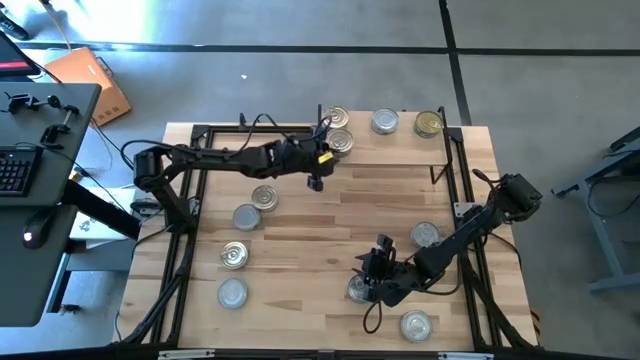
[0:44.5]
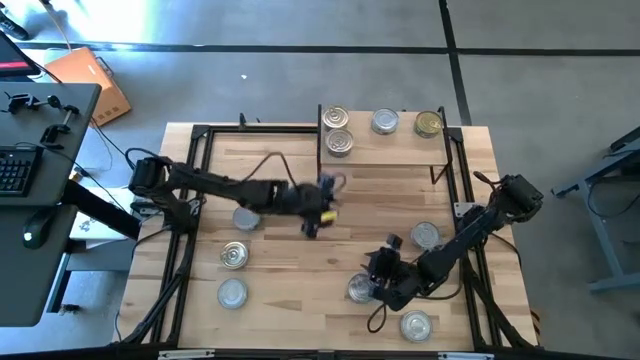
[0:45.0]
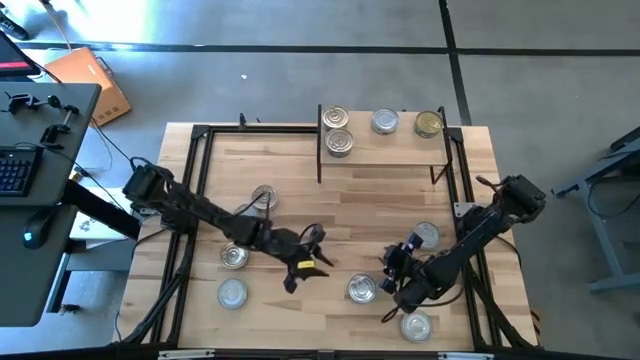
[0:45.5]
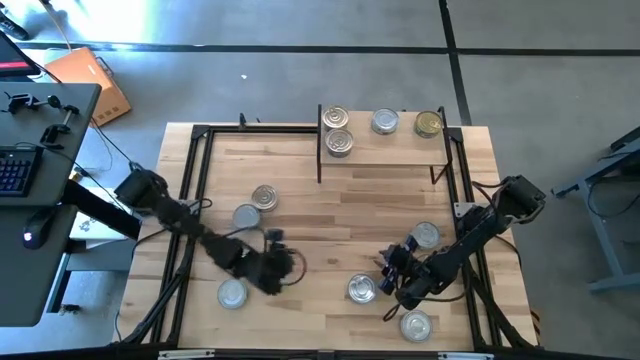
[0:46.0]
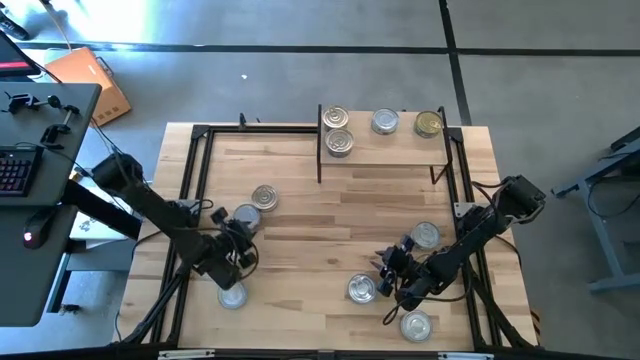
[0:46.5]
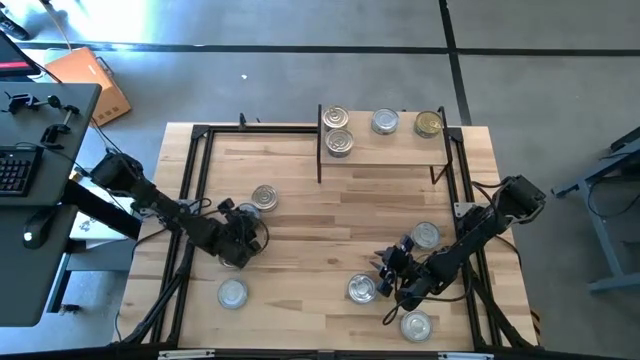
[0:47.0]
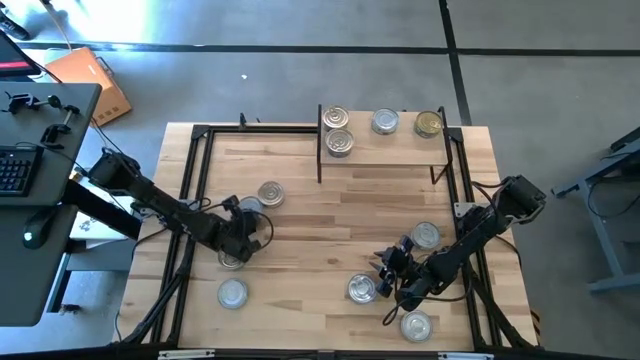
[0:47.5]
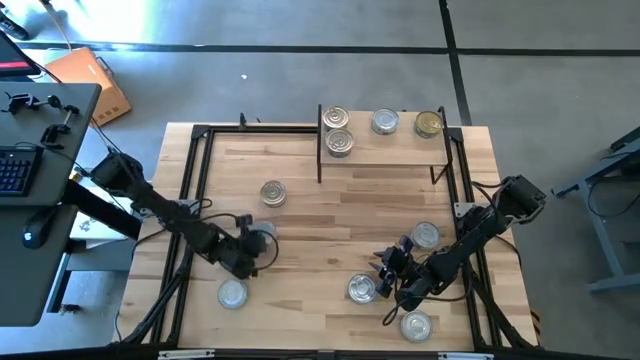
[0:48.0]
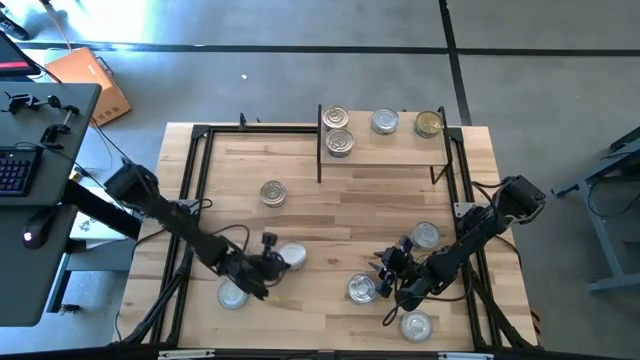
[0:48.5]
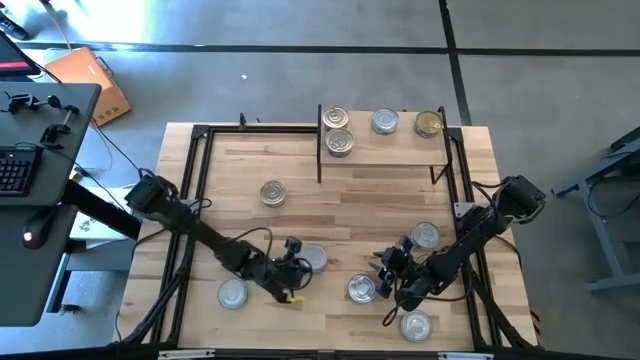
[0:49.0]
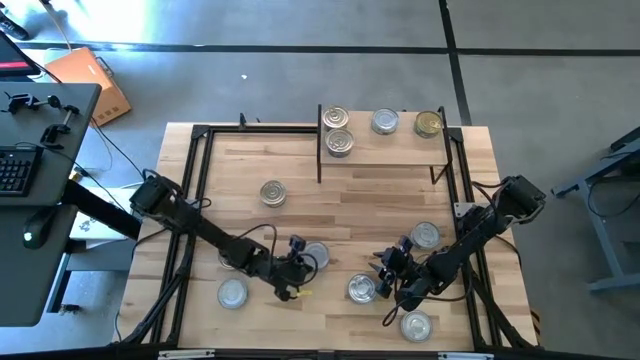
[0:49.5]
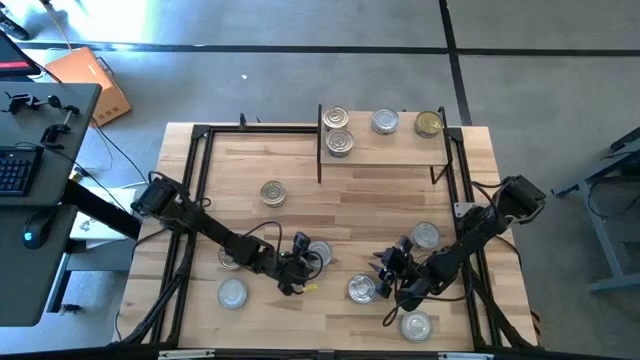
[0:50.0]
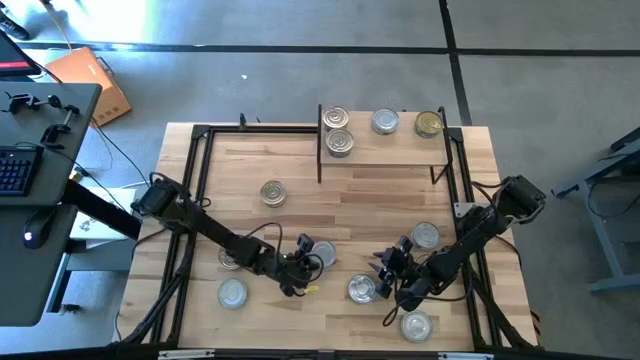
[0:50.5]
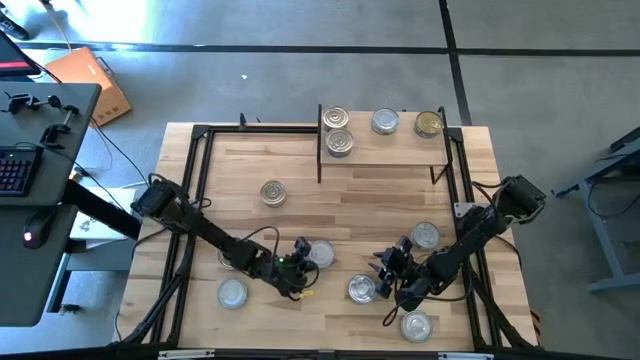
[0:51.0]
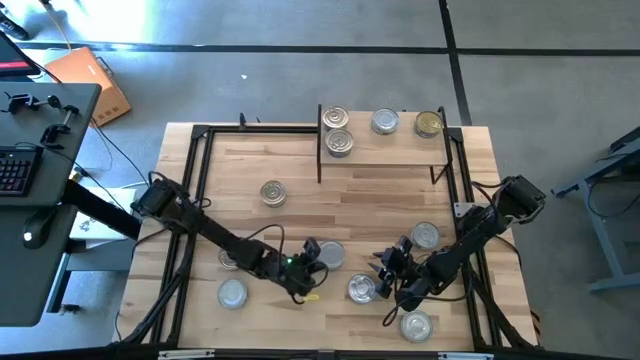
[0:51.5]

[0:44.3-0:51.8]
Task: Stack canned seafood by type on shelf
Put the green white tuna can on the shelf

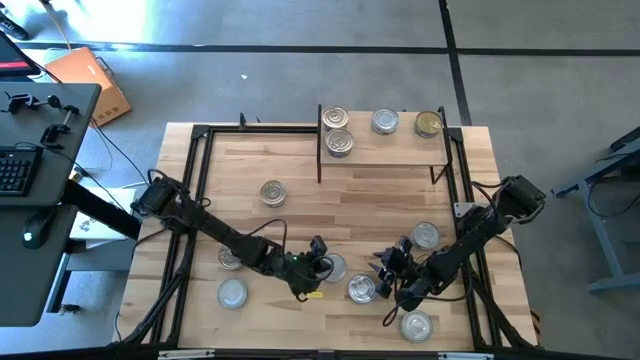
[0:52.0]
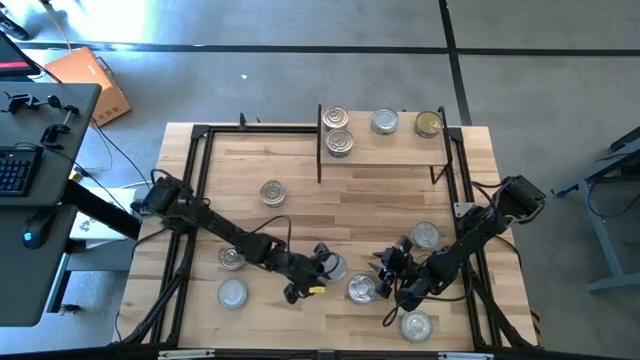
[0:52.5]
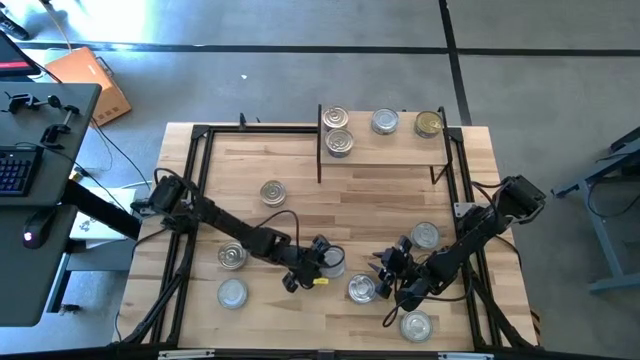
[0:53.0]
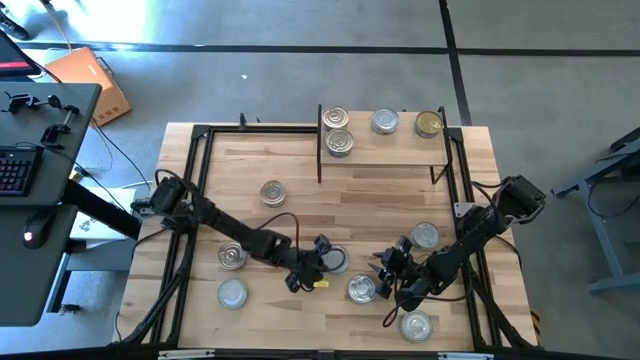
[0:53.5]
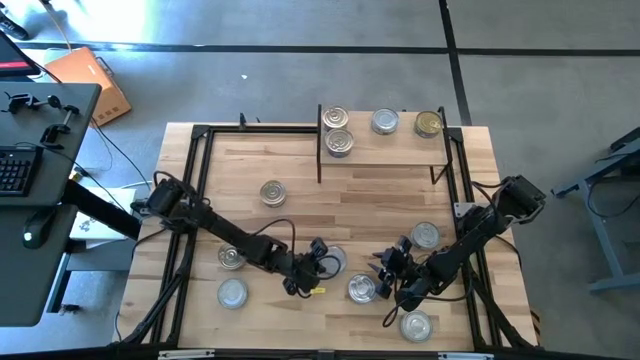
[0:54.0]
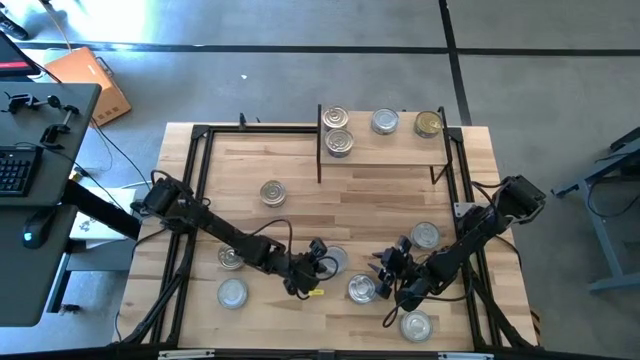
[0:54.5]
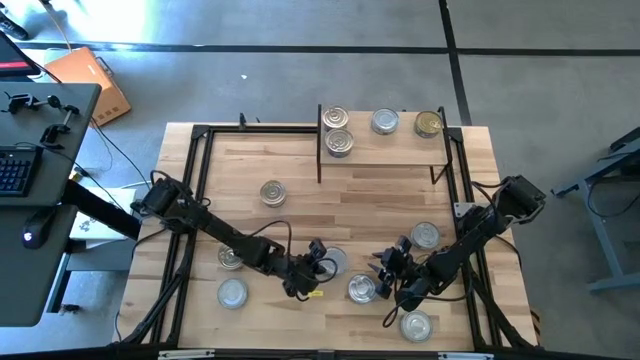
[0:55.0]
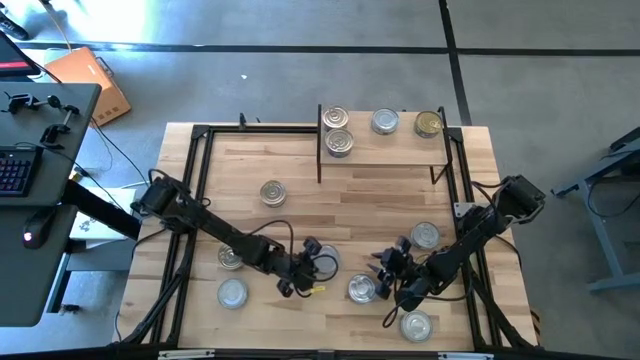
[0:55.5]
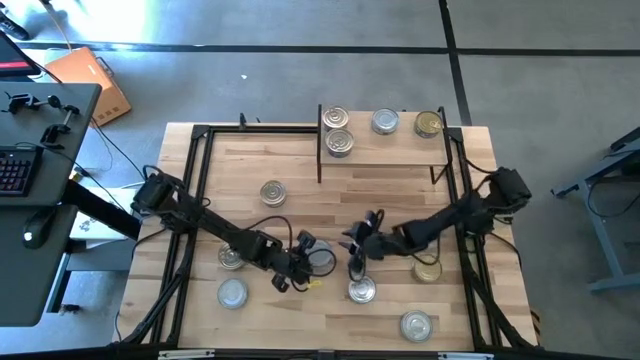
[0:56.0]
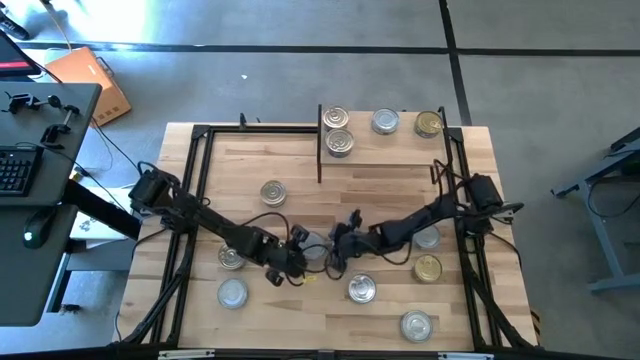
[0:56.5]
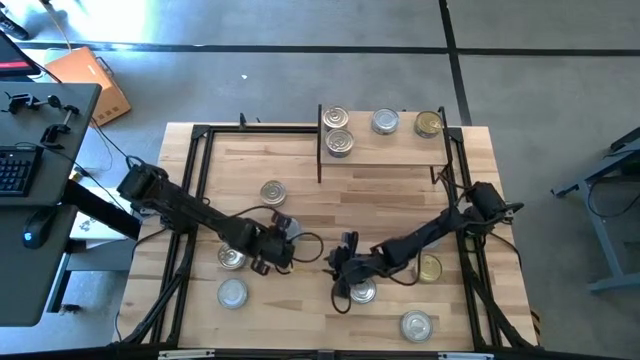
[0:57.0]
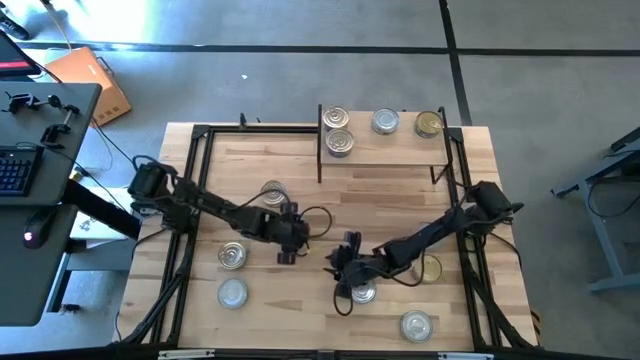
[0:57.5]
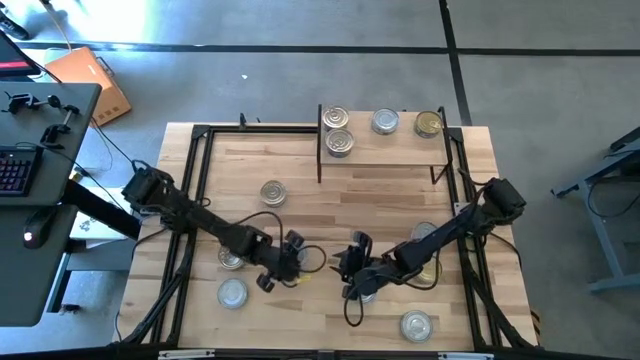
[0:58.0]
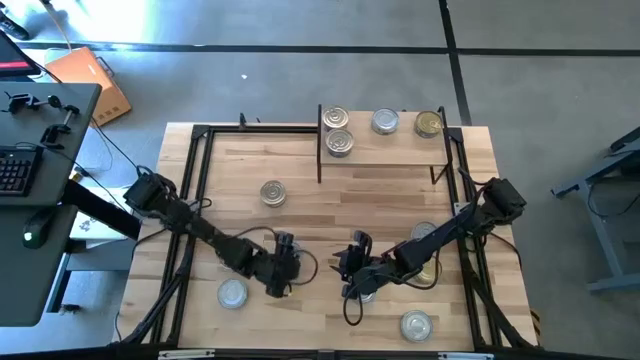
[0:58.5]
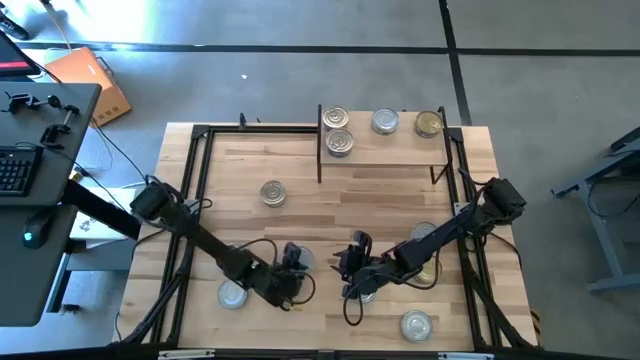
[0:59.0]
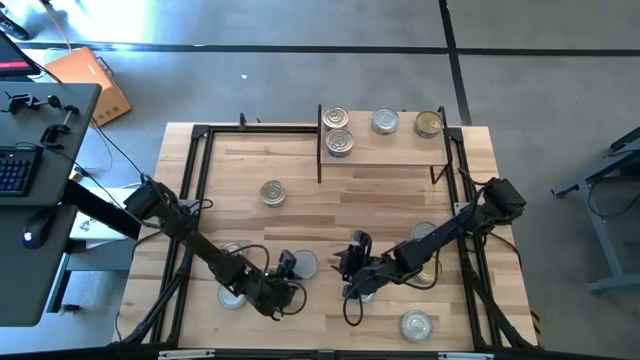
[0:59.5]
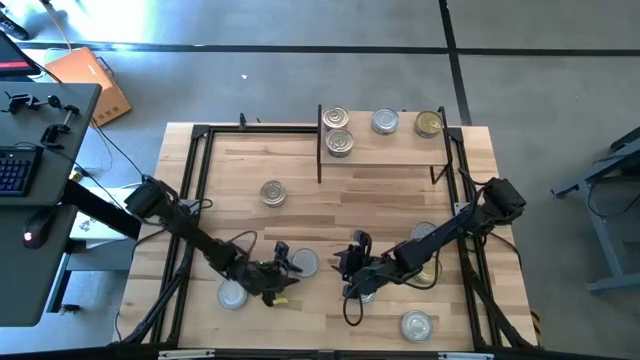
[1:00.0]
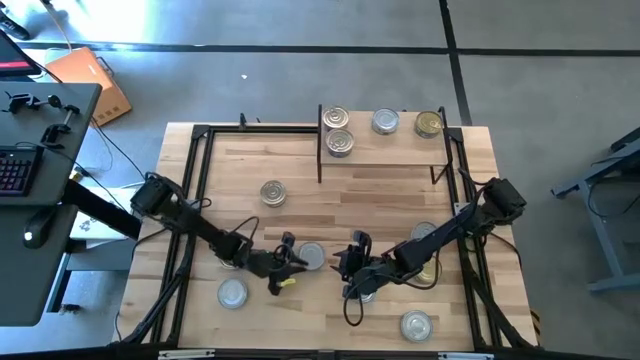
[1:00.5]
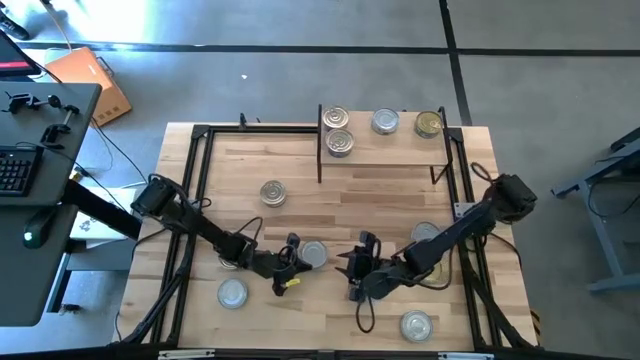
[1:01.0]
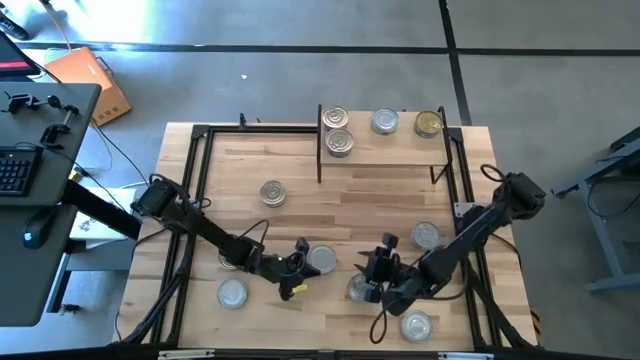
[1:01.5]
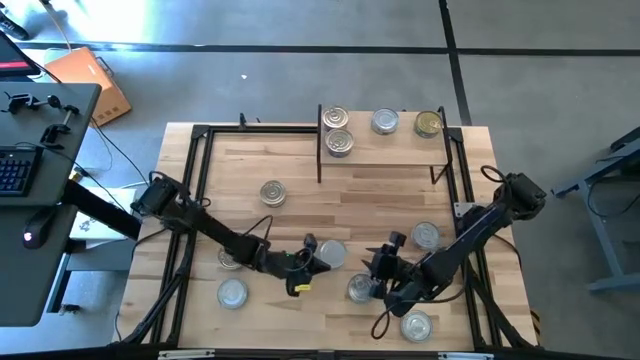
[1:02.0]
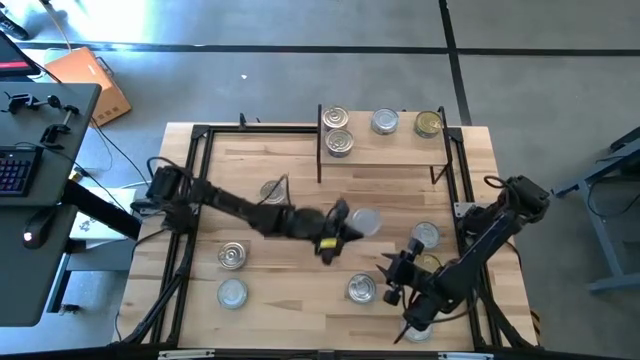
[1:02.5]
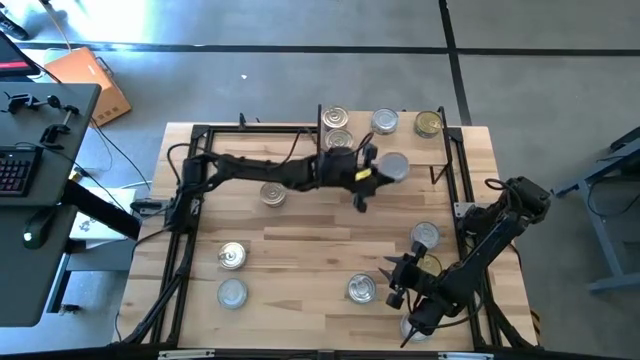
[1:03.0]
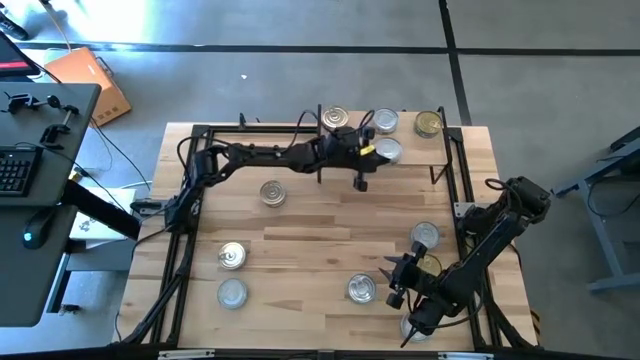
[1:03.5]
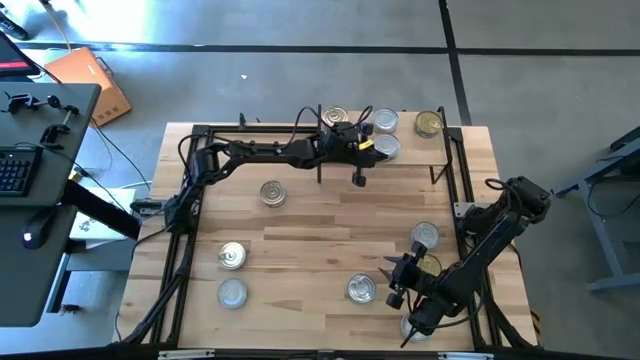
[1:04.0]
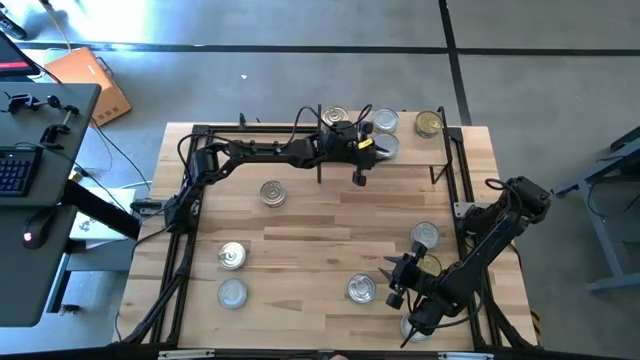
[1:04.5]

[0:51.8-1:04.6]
Put the green white tuna can on the shelf

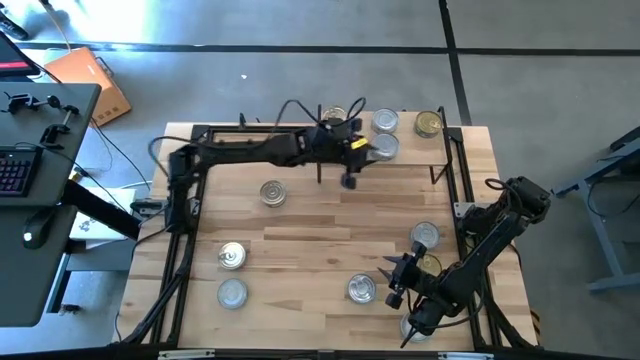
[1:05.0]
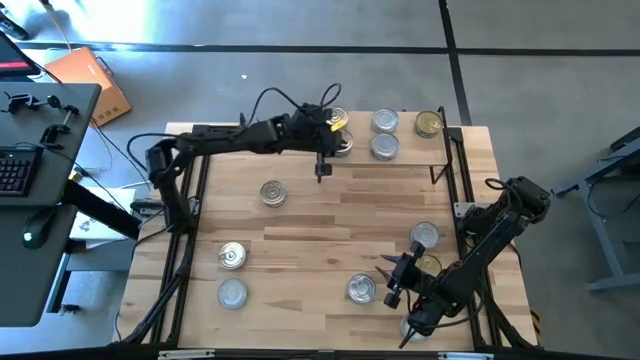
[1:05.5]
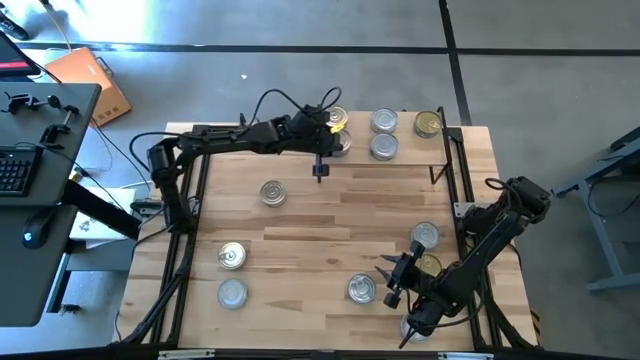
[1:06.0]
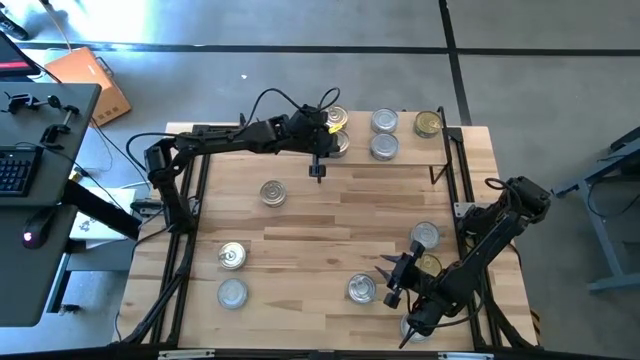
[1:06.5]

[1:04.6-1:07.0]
Adjust the blue tuna can on the shelf
